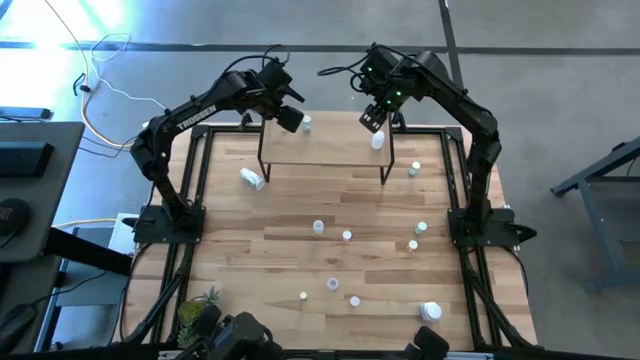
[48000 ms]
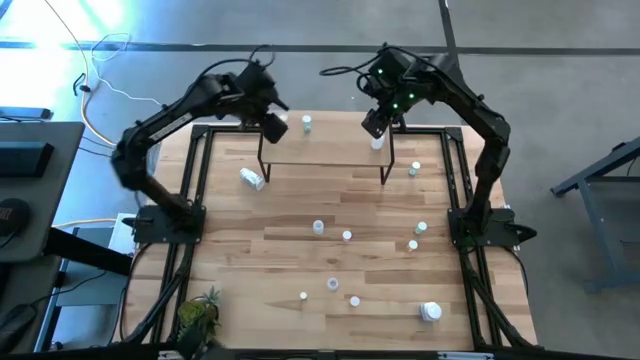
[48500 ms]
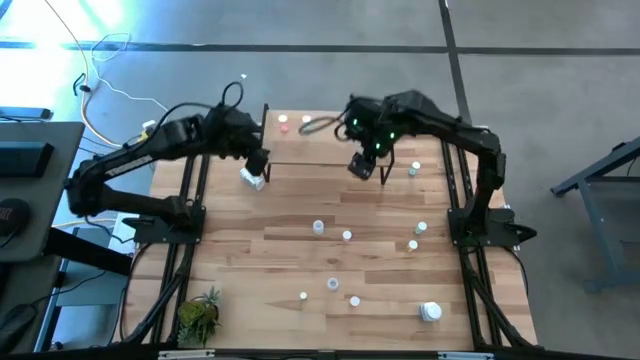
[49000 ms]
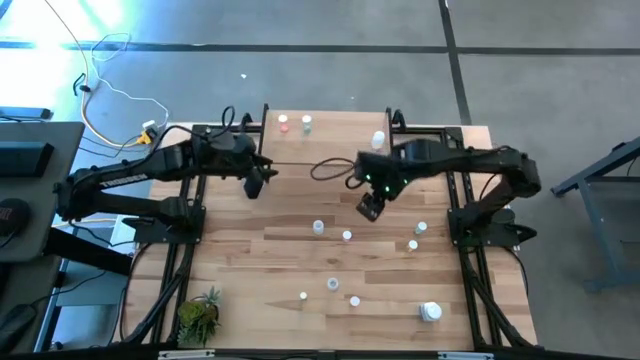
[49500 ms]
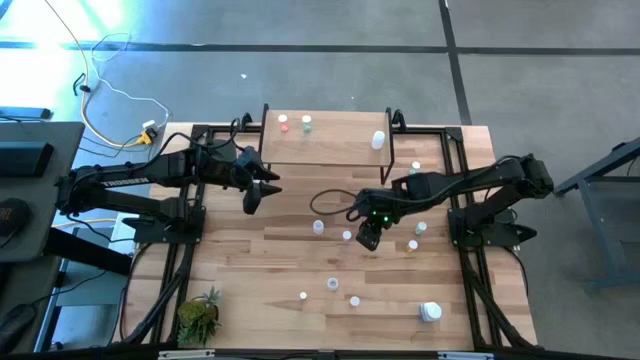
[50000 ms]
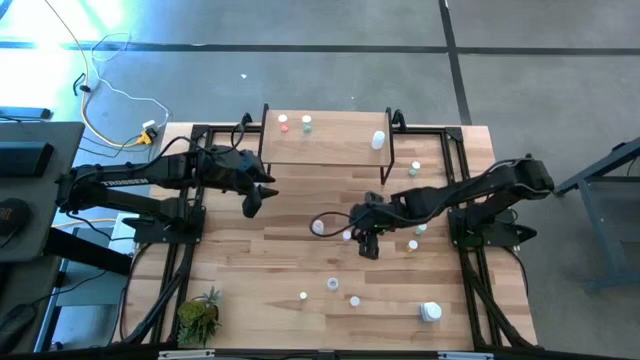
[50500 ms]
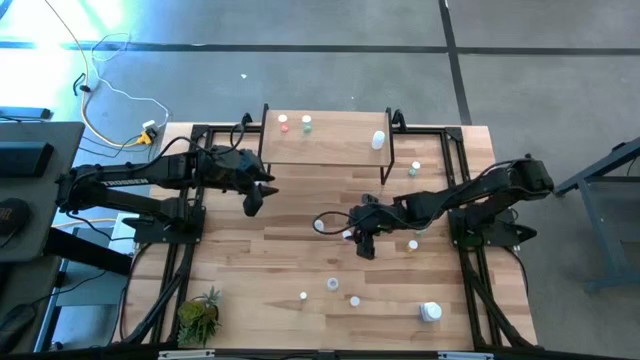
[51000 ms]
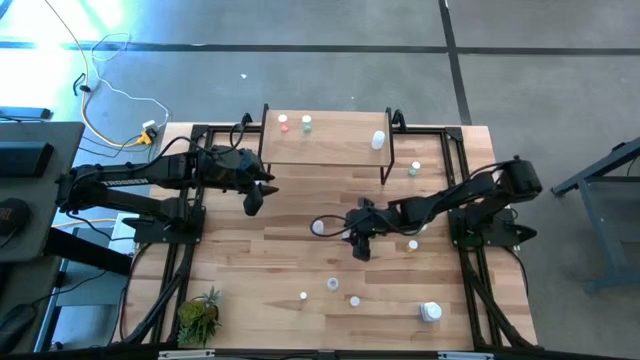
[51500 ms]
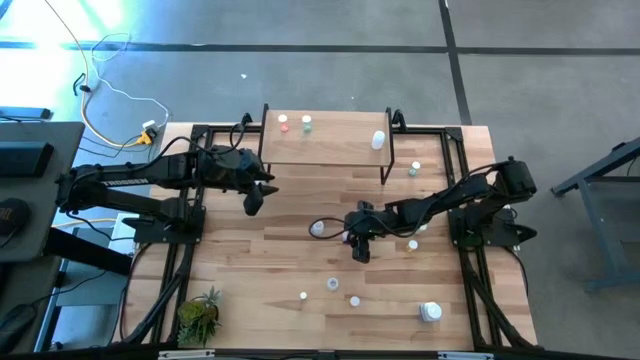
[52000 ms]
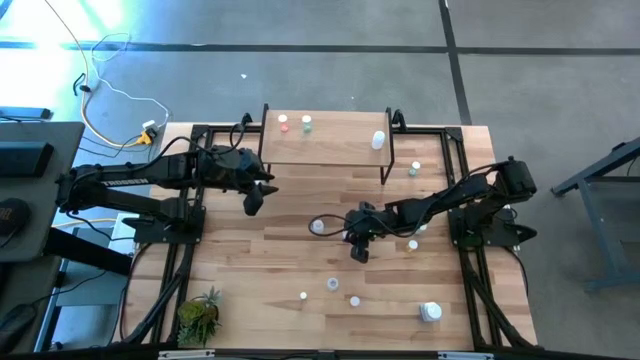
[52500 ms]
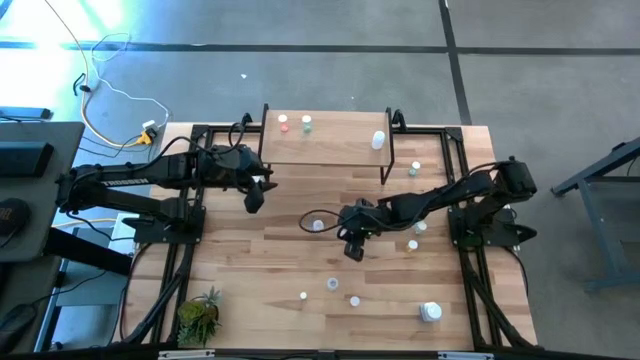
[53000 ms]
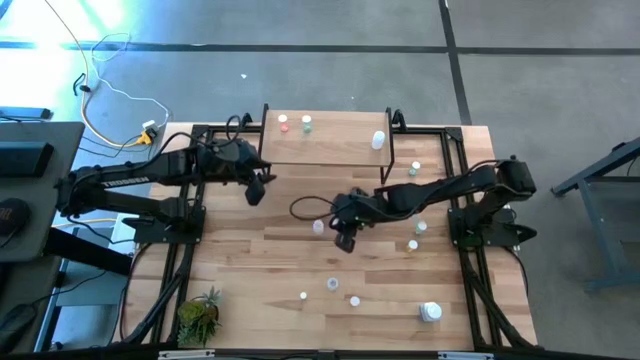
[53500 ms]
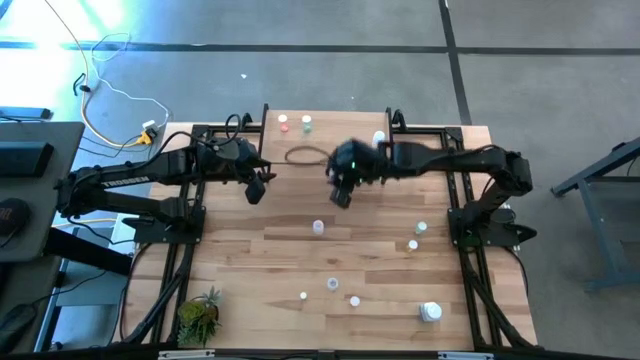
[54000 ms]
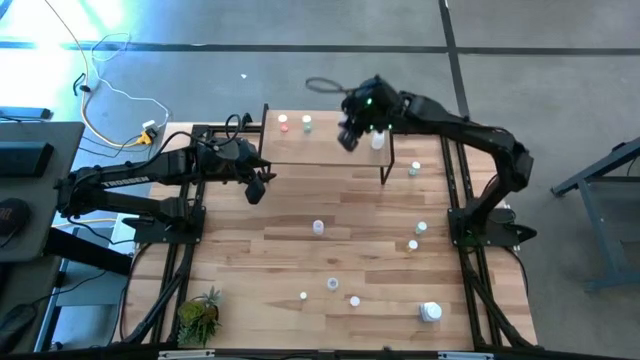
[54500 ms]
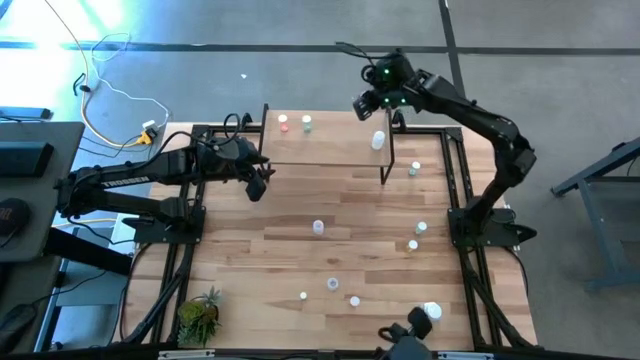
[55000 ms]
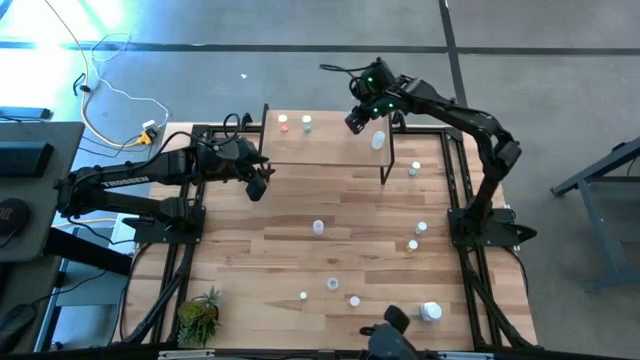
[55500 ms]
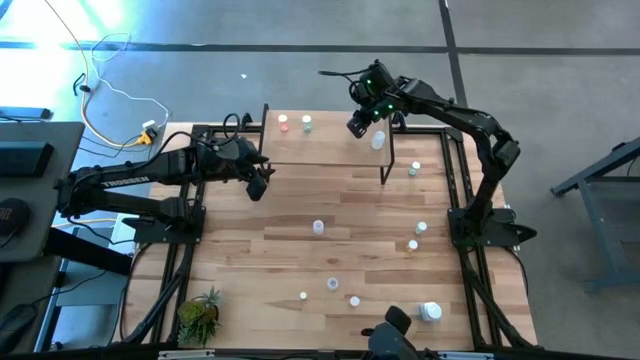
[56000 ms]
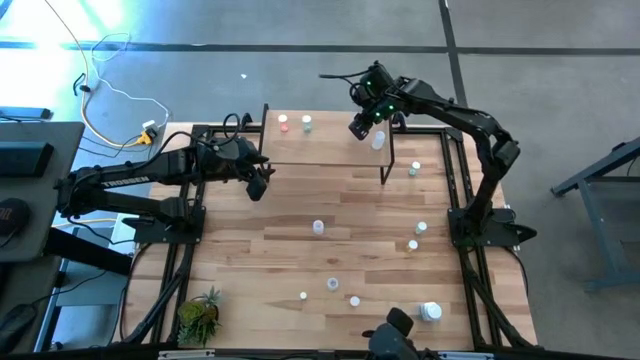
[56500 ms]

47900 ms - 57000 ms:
Task: Pick and place medicine bottles onto shelf by color
Put the pink pill bottle on the shelf

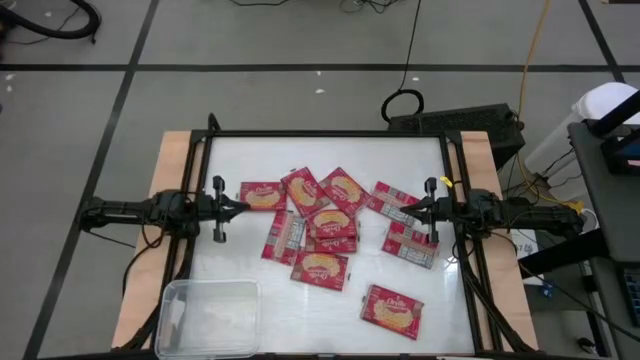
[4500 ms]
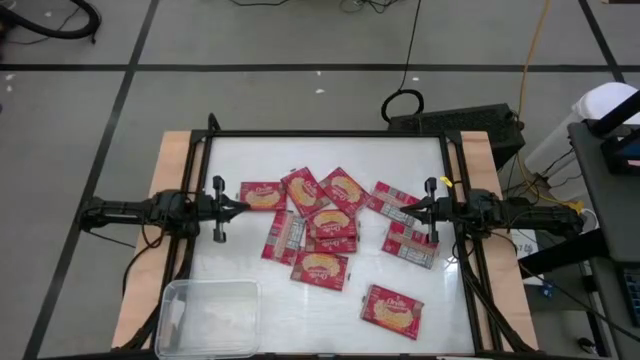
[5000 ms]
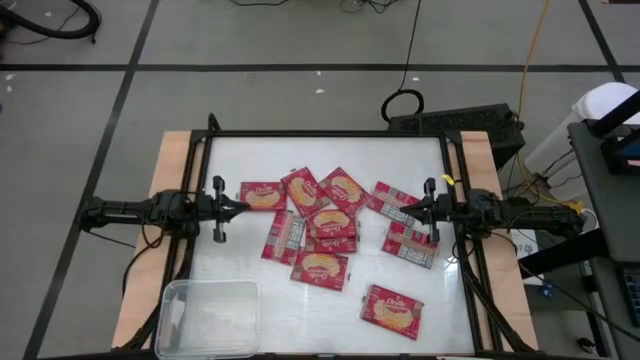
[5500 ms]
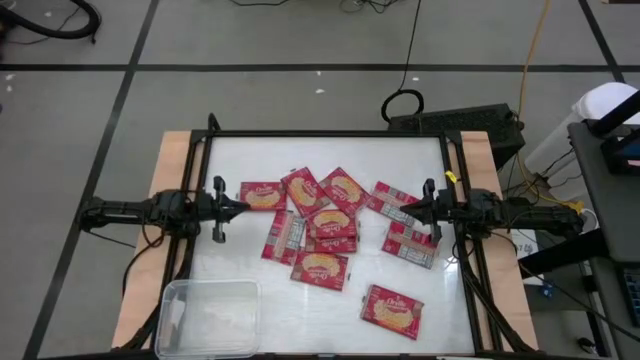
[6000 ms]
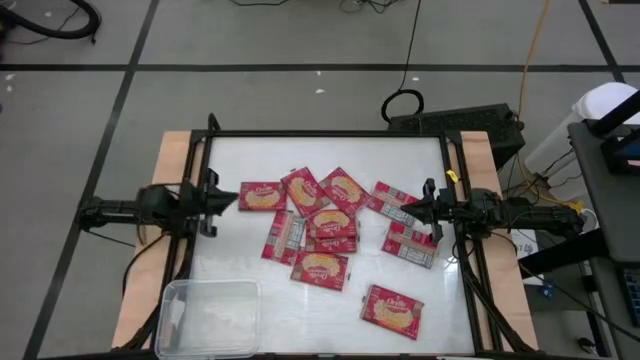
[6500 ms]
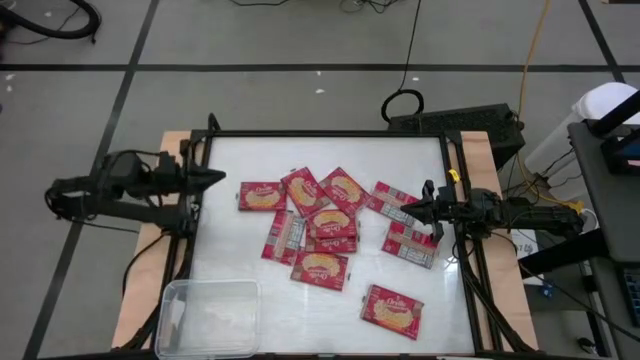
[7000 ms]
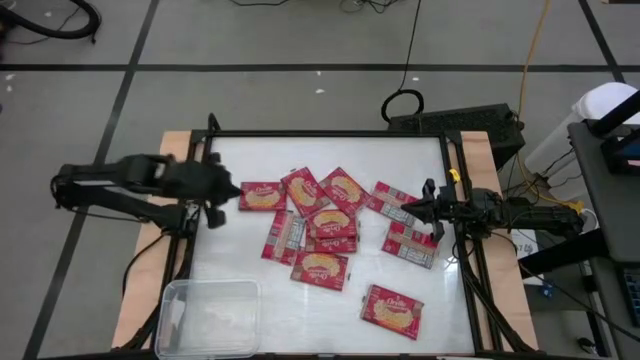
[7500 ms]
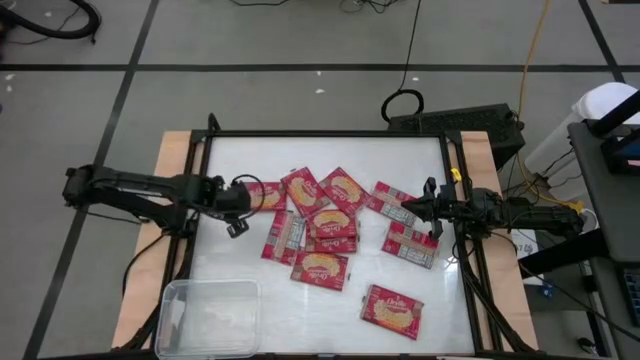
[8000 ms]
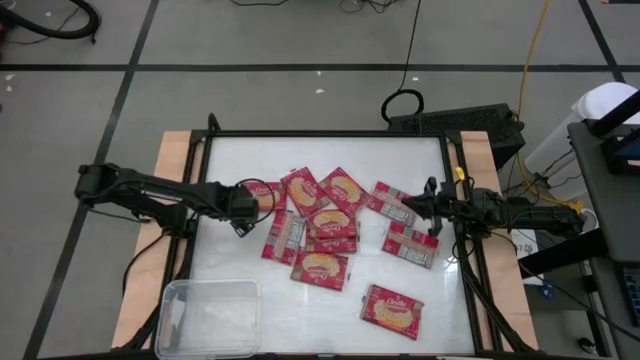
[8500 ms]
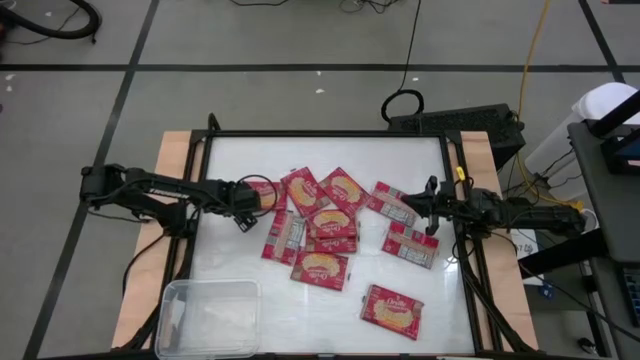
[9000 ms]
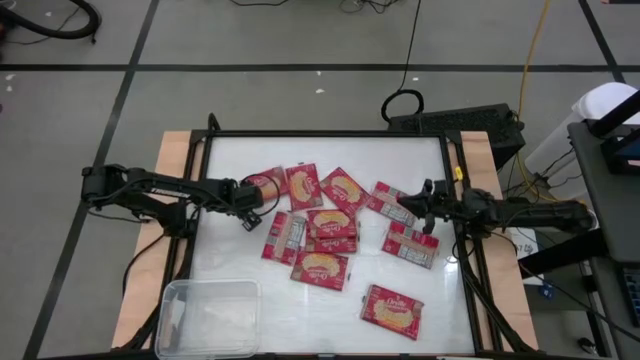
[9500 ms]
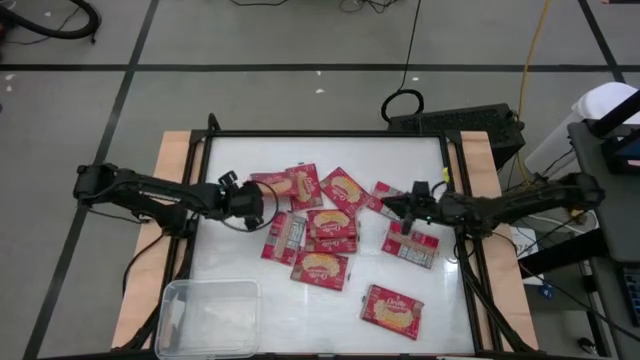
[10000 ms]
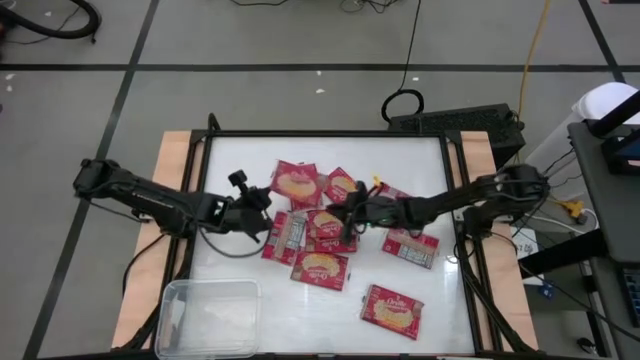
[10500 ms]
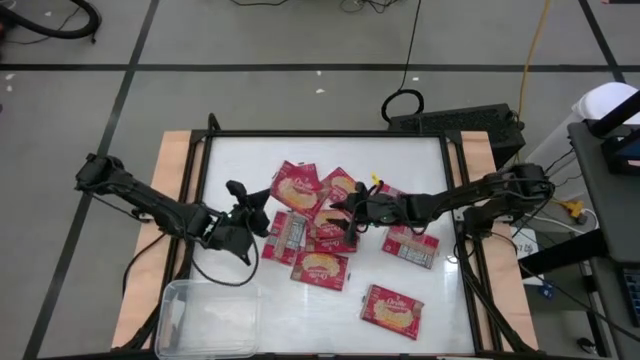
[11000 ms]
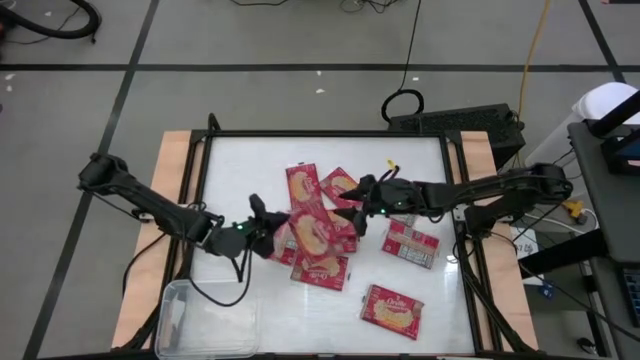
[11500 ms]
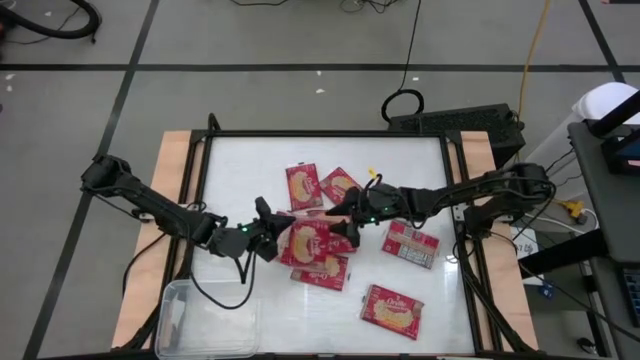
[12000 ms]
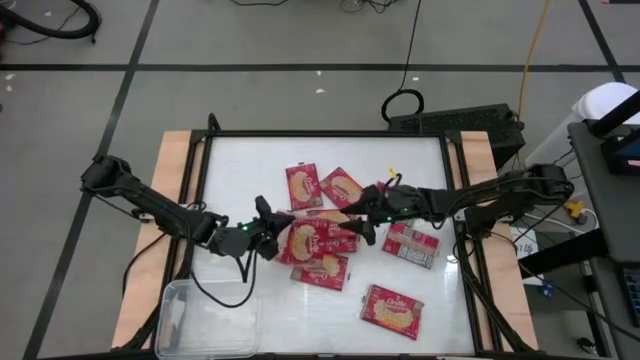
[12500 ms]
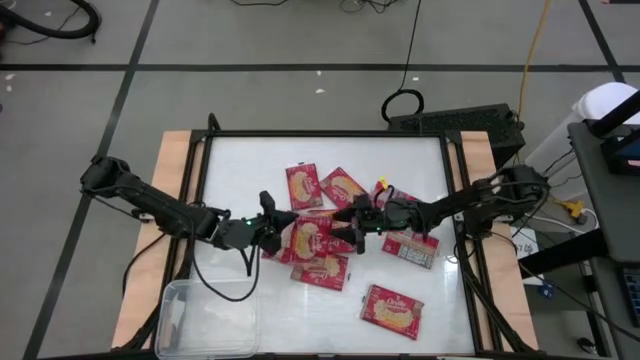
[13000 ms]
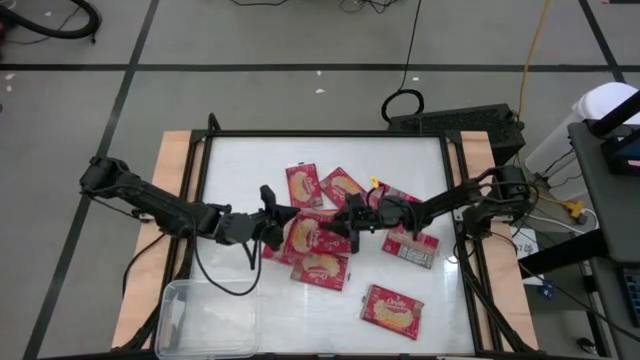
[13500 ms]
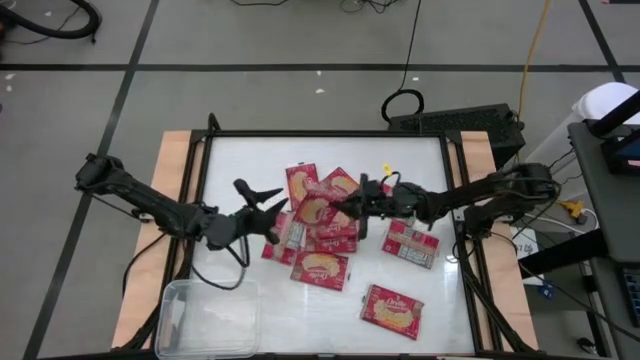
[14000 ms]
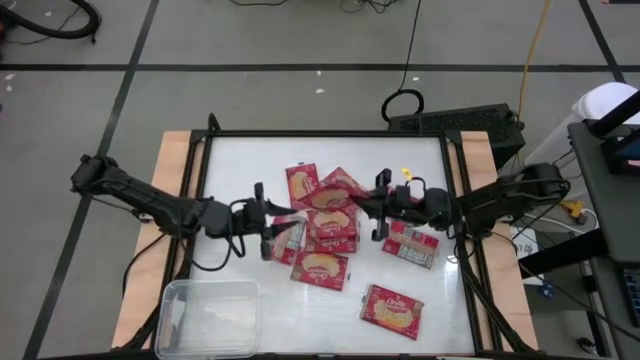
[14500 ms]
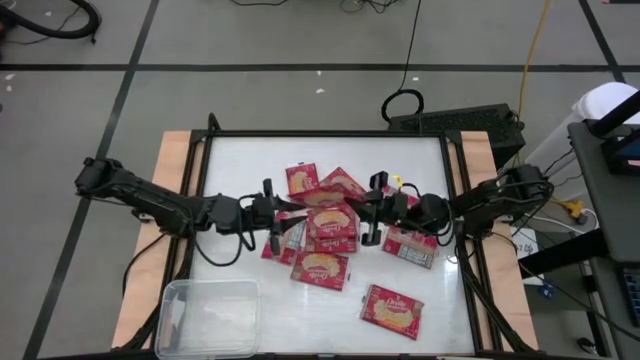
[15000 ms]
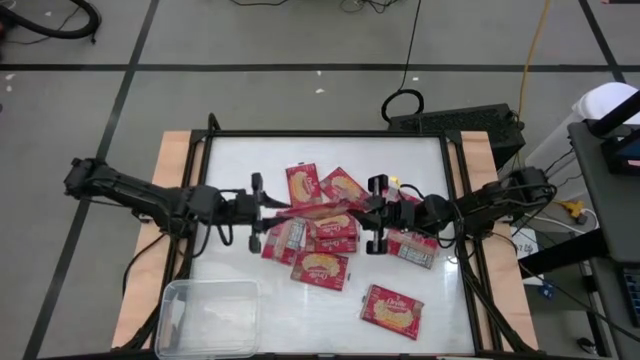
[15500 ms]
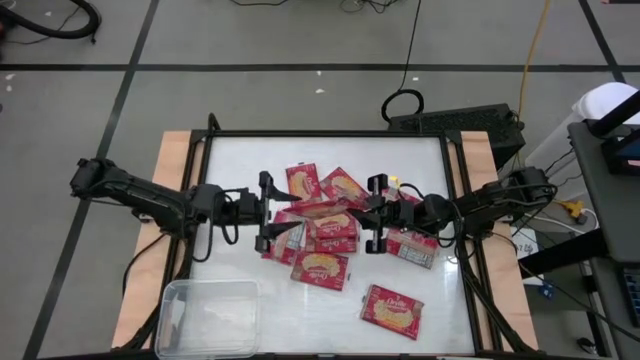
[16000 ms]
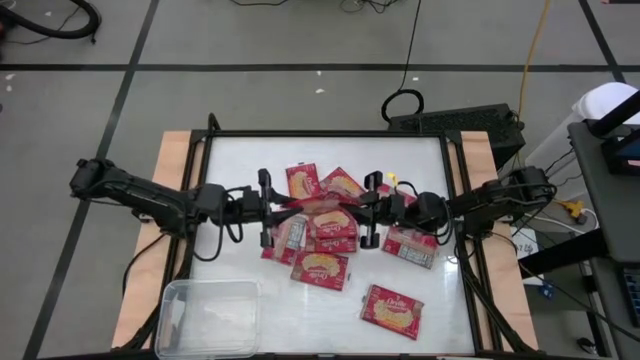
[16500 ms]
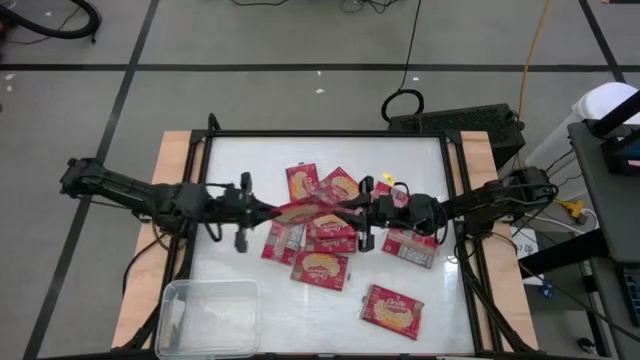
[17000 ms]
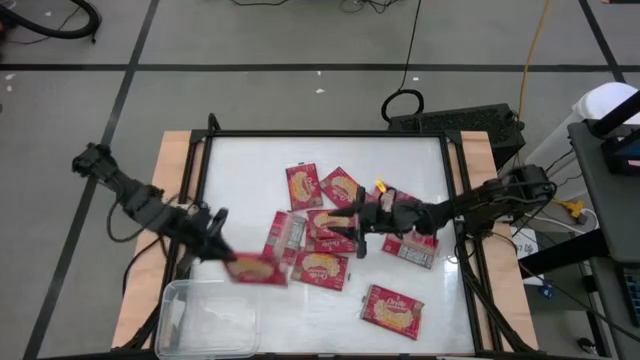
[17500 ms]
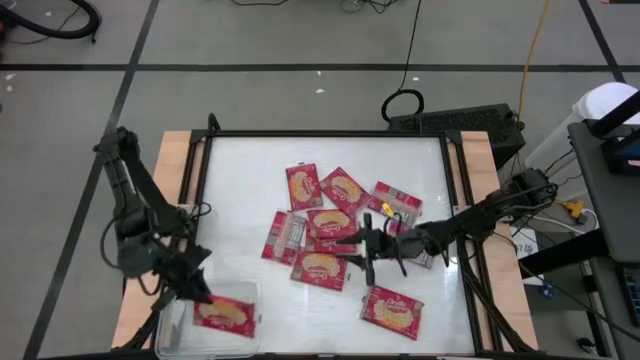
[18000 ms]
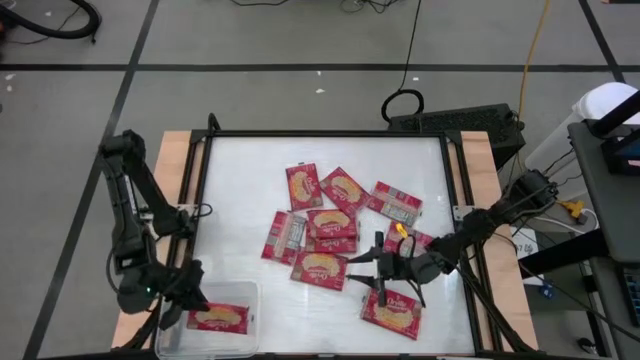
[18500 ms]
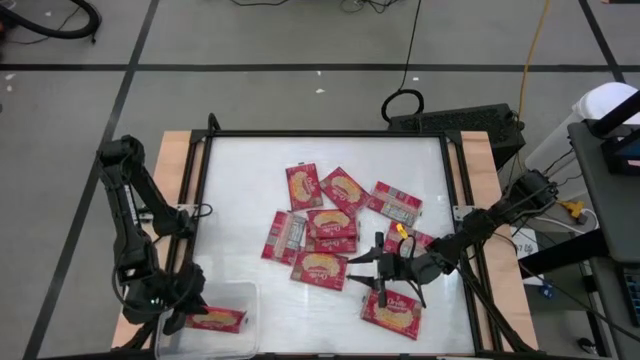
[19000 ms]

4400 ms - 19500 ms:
Task: Sort popcorn bags into baskets
Put the popcorn bag into the transparent bin
